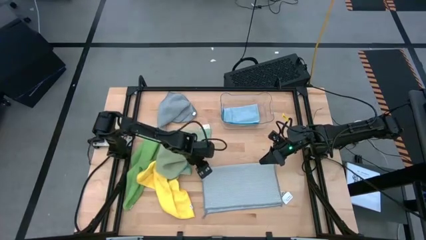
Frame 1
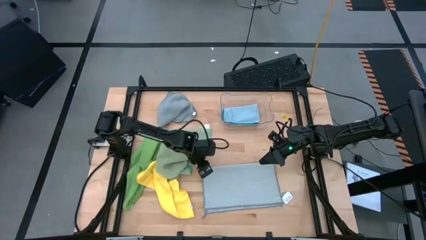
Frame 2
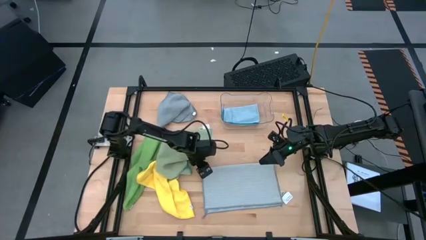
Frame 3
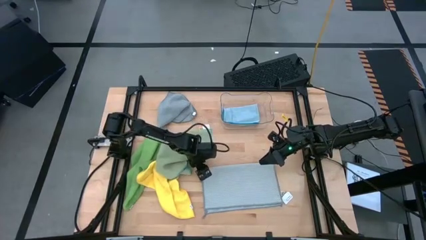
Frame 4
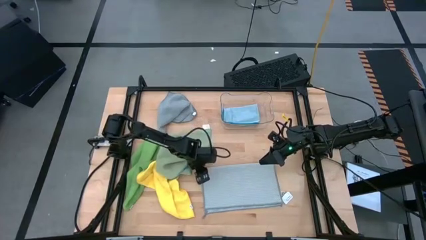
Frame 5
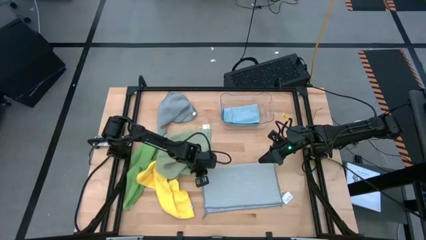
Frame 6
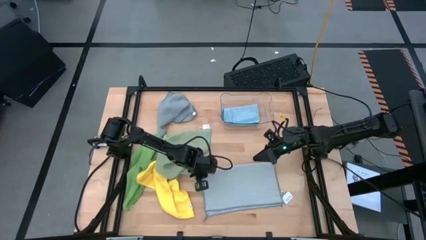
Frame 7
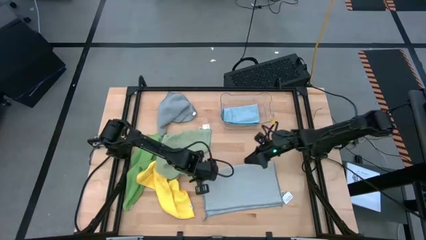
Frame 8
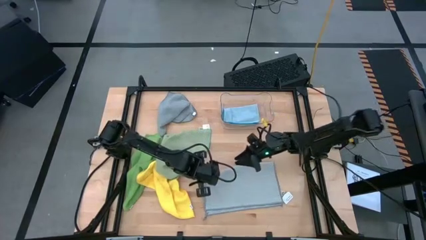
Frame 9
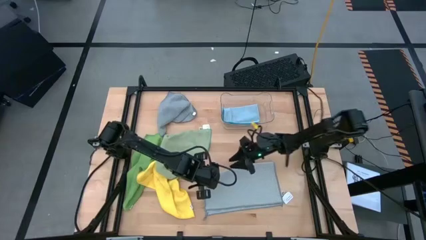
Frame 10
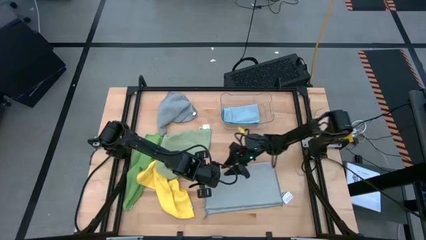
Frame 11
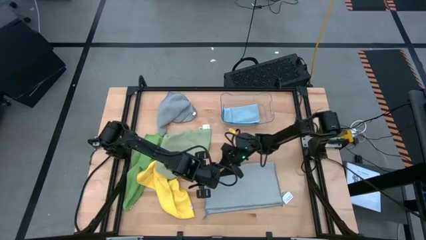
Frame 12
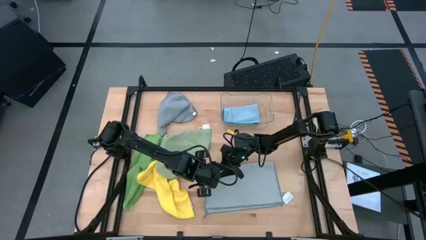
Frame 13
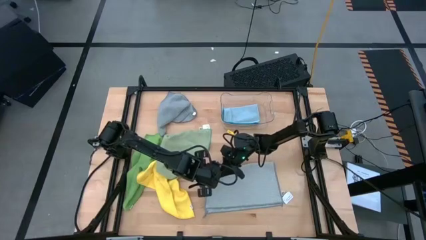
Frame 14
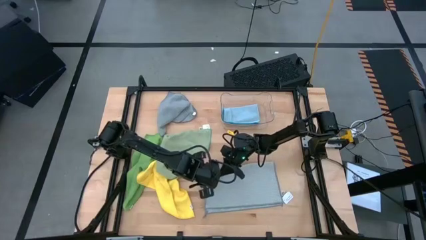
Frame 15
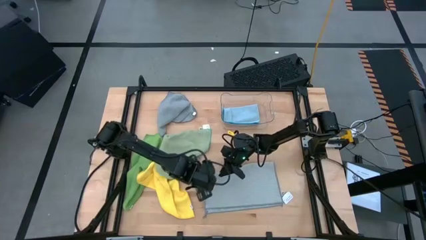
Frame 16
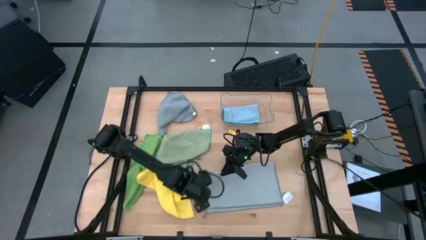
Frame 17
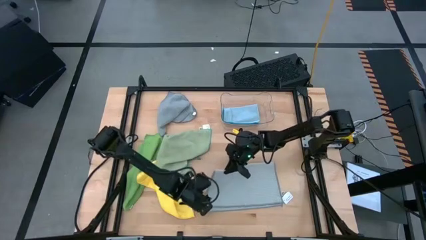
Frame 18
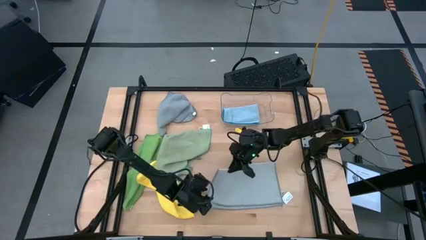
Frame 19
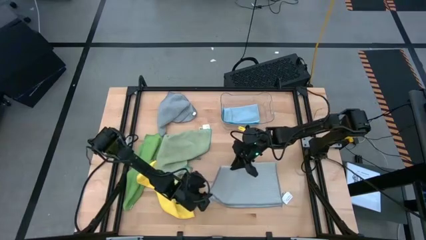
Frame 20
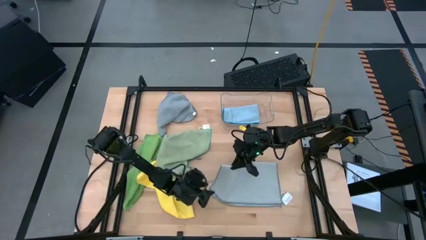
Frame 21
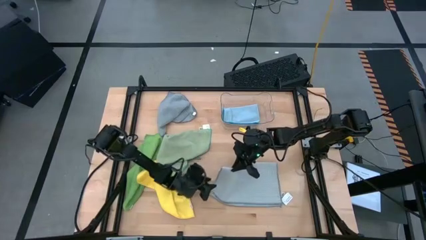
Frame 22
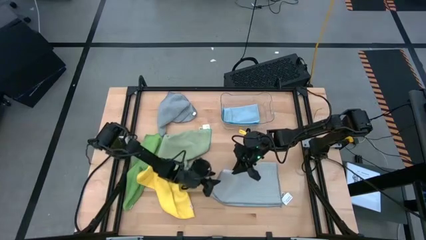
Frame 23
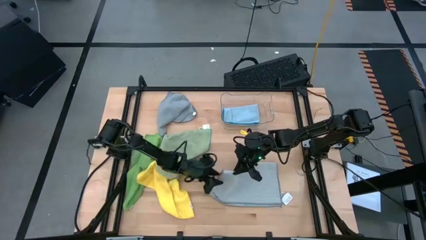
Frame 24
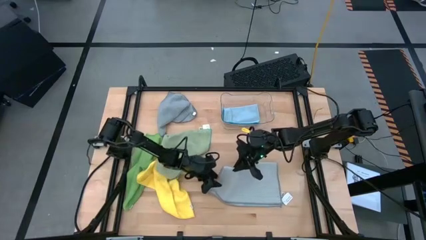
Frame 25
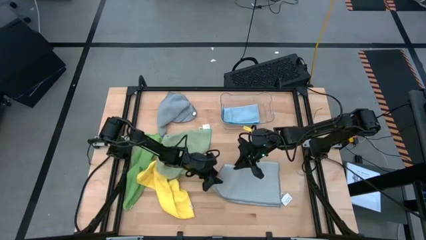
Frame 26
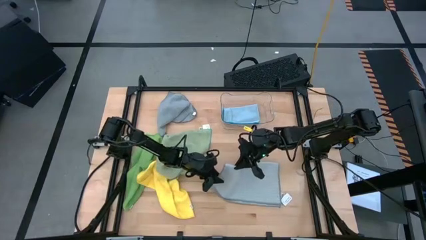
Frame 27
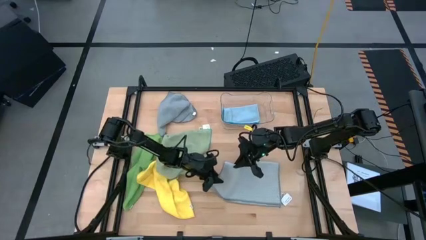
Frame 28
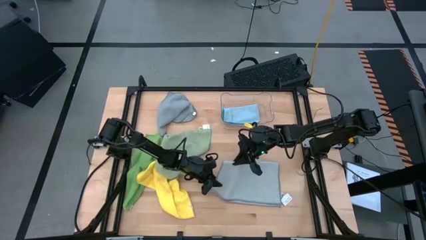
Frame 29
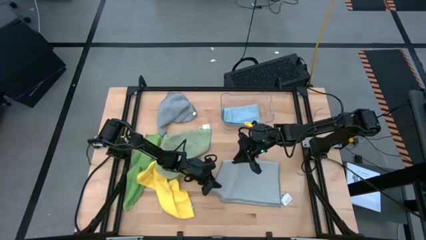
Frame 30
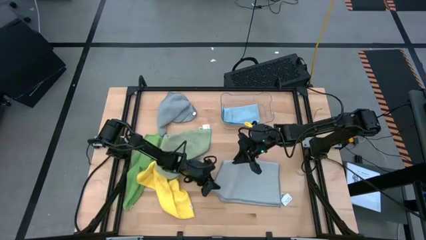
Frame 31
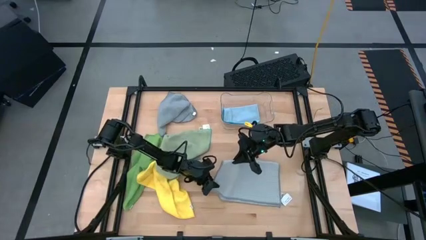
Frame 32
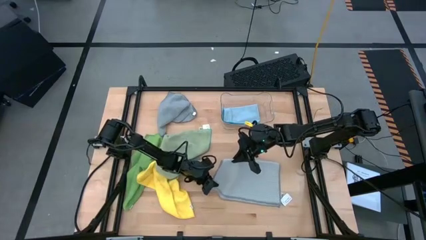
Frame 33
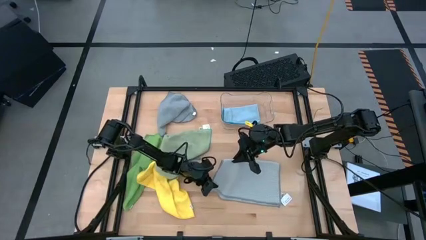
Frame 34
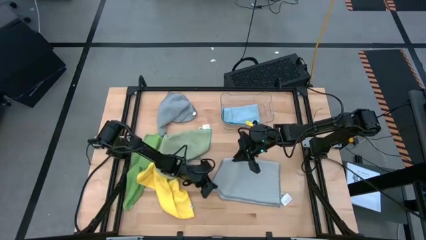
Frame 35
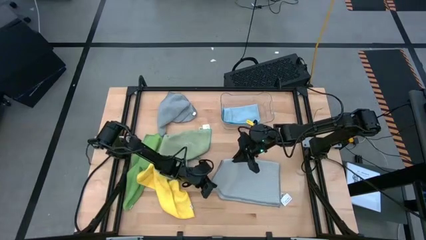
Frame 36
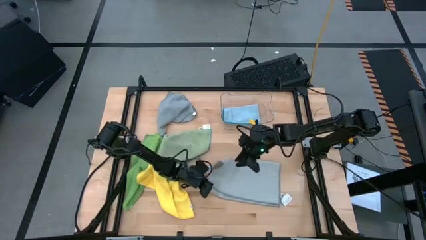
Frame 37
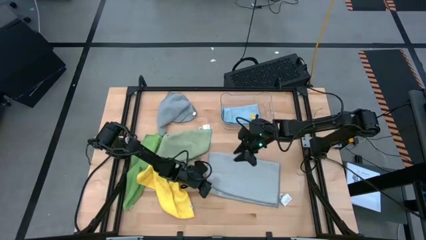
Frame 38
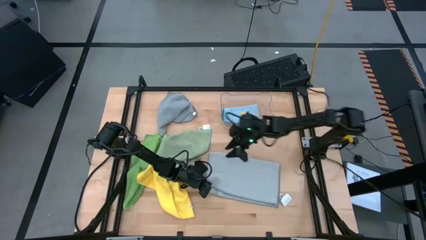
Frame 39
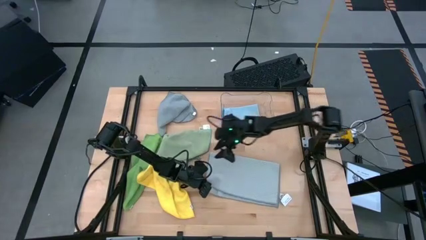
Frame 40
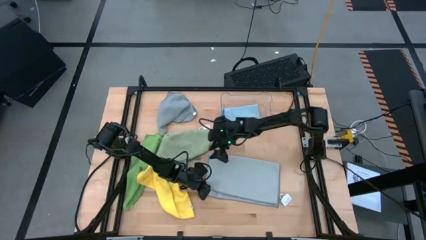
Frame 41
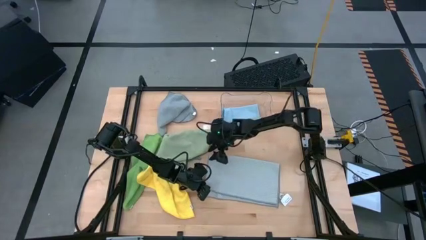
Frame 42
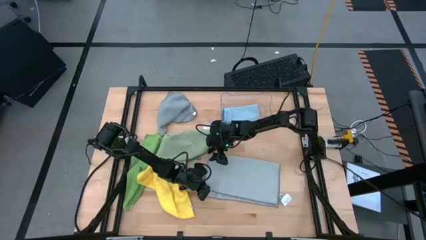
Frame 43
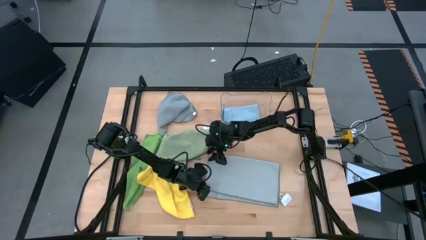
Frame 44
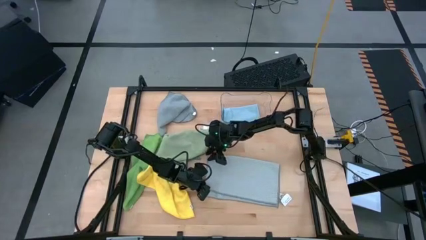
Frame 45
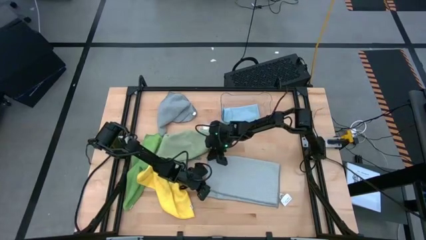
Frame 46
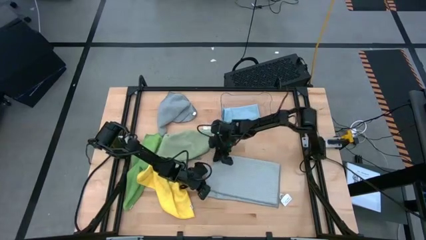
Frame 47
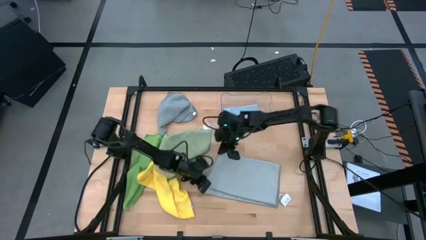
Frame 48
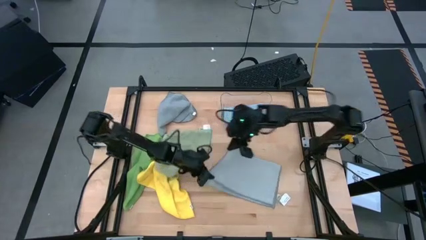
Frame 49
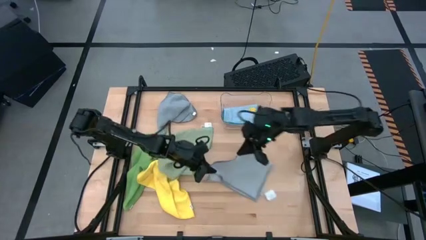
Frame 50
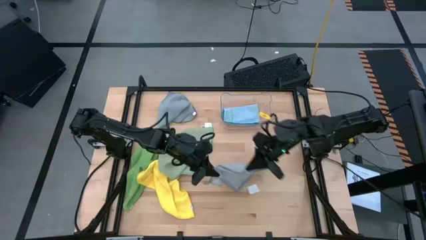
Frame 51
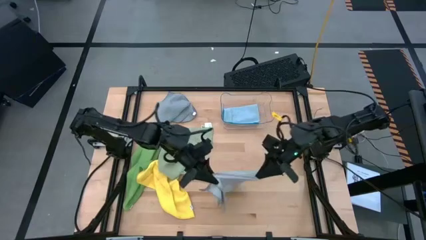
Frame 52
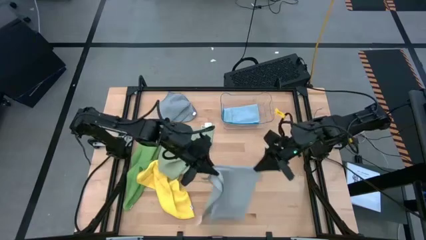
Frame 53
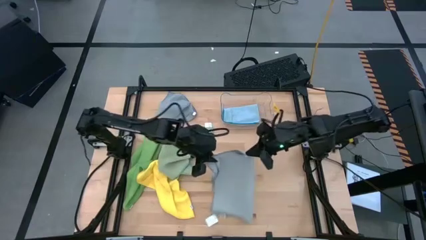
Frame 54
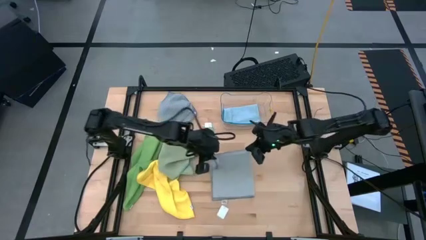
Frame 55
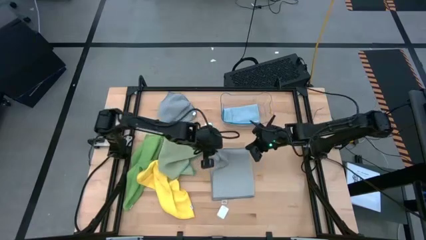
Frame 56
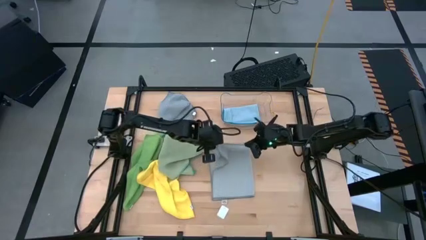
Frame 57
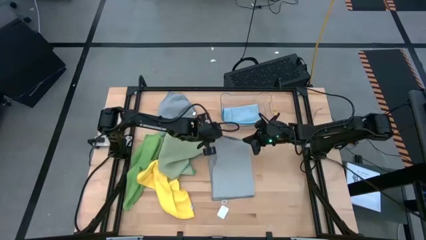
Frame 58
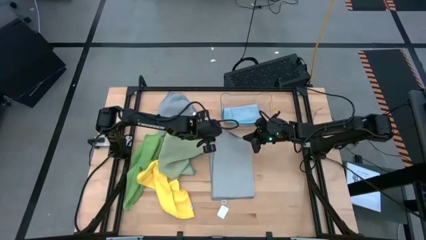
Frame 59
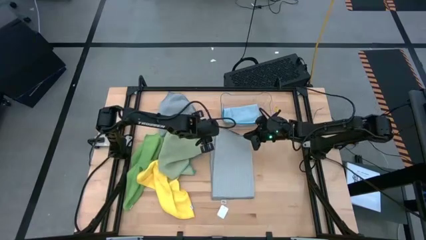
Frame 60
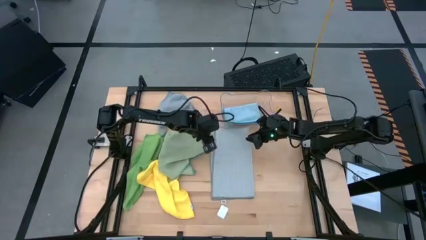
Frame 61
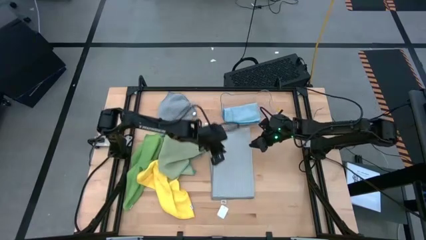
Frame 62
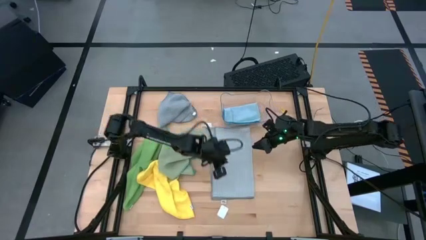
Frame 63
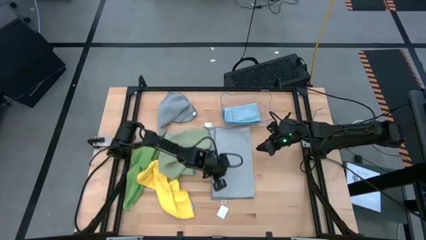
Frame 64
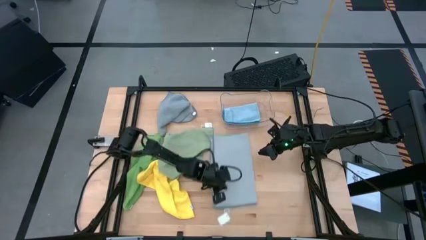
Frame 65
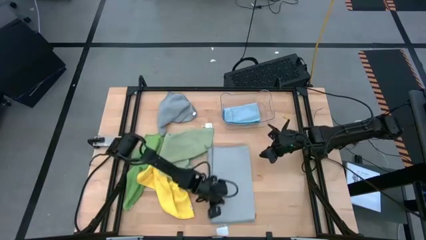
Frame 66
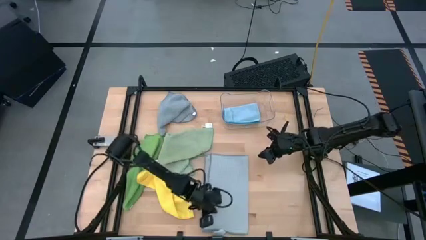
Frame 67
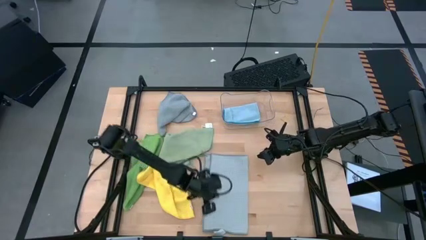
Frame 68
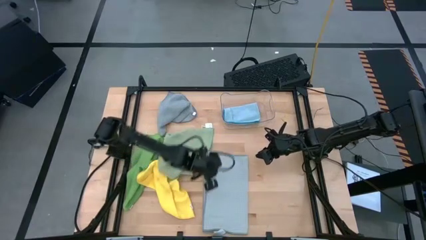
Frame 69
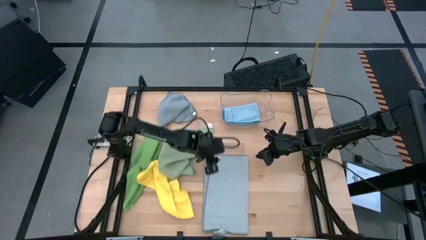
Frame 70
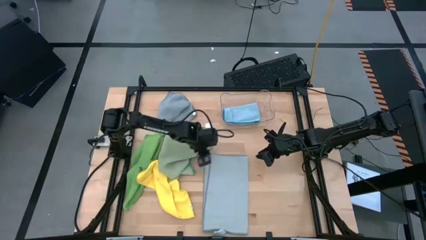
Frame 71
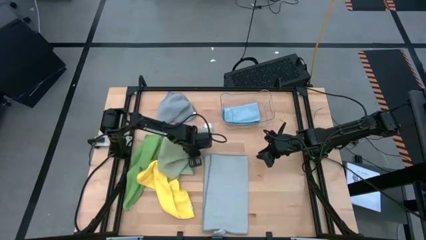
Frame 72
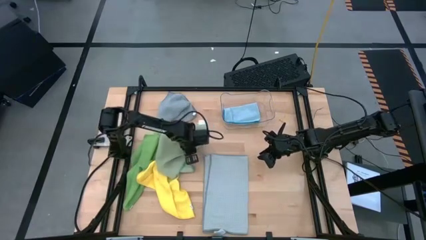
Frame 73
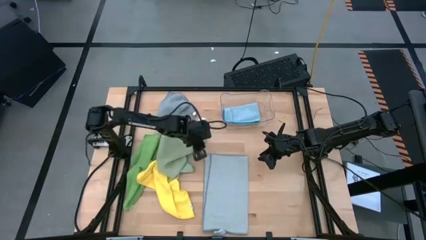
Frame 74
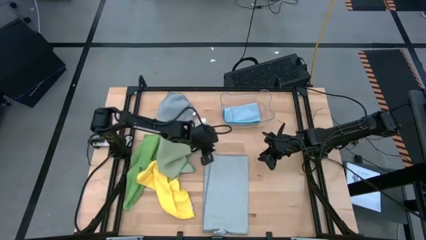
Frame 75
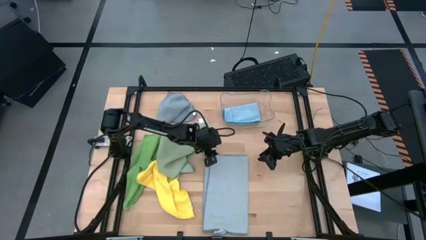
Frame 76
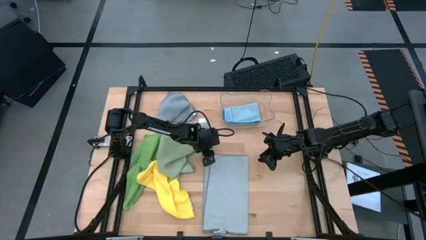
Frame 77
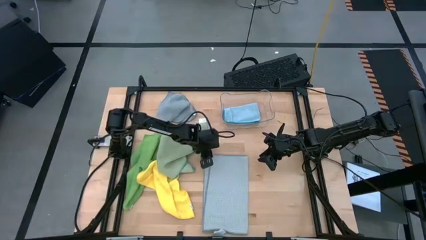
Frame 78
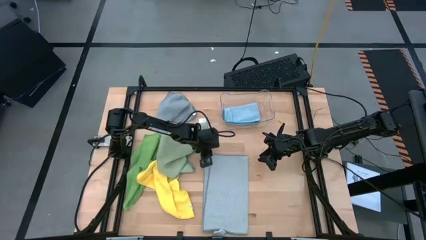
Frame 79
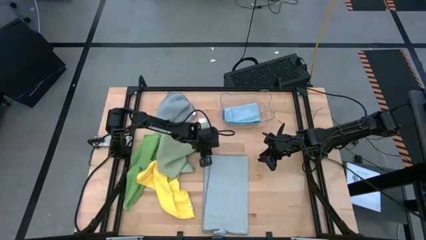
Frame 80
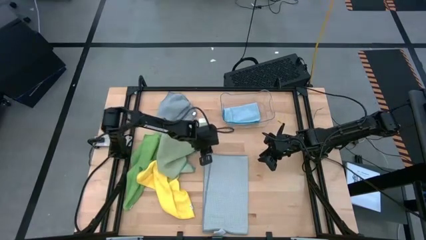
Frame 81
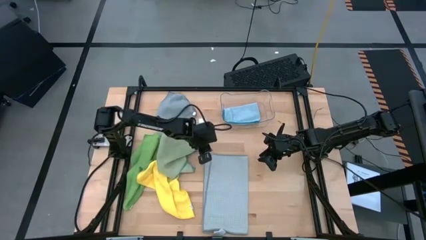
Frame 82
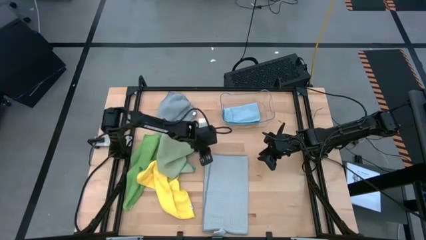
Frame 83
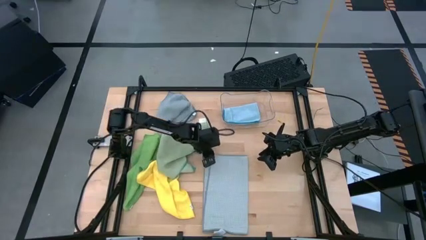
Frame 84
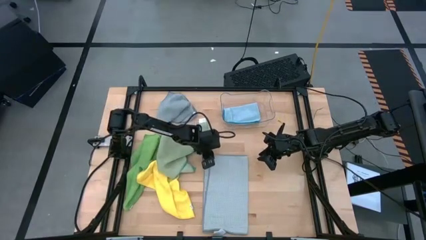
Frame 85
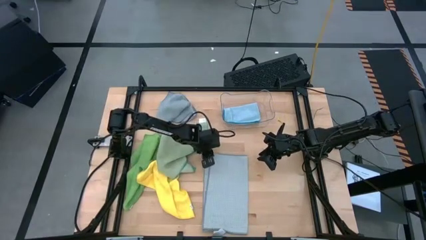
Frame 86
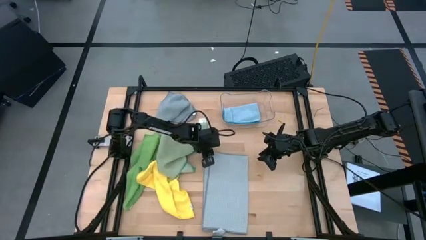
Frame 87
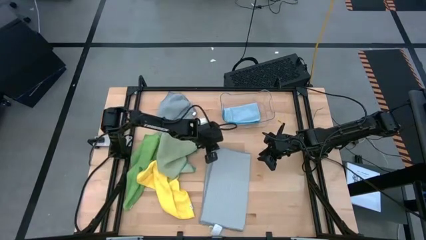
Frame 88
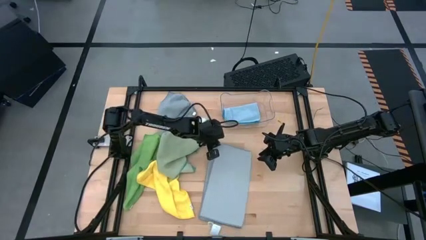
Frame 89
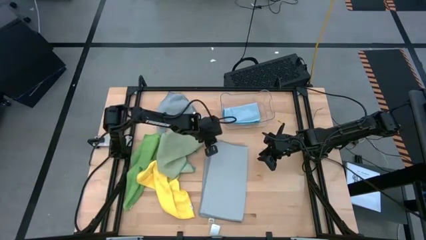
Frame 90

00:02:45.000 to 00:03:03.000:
Task: Fold microfiber towels
Fold the light gray towel
